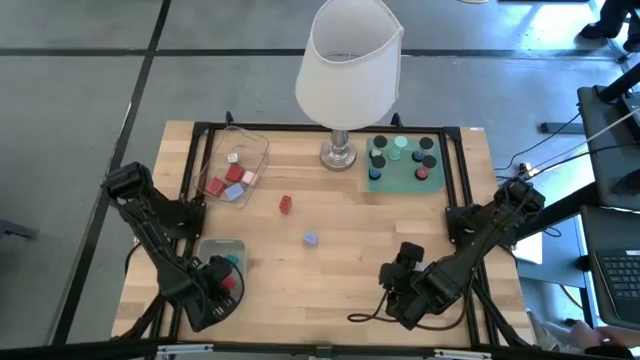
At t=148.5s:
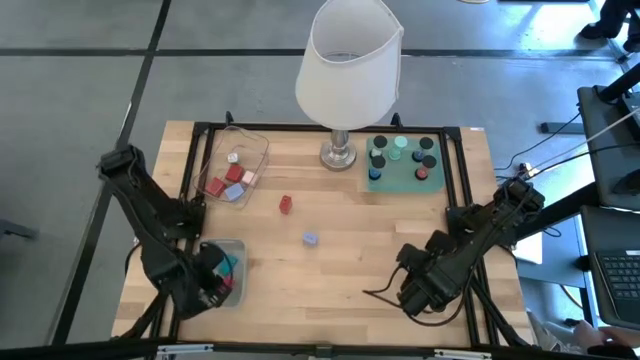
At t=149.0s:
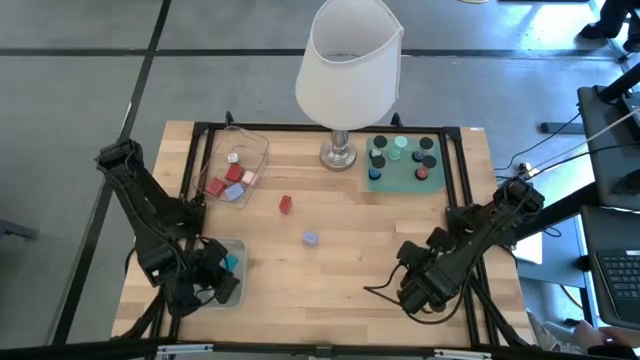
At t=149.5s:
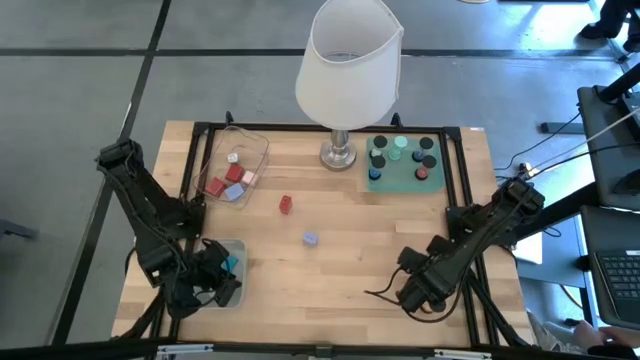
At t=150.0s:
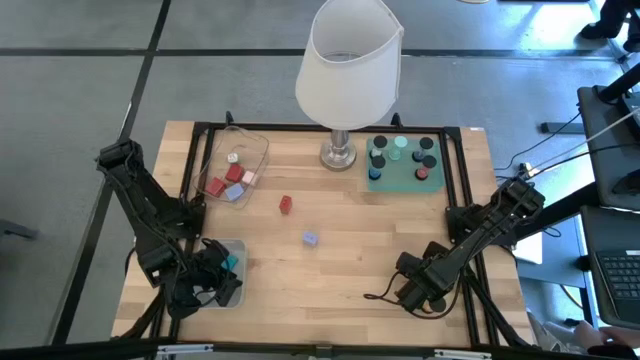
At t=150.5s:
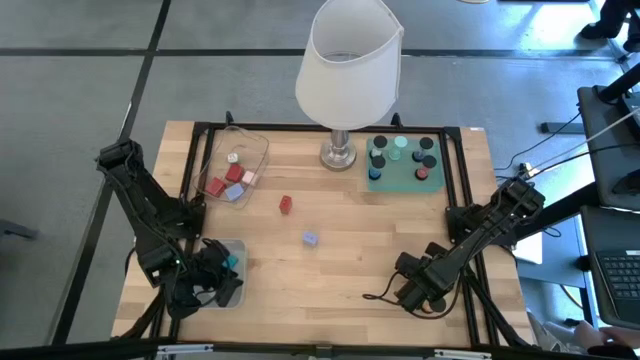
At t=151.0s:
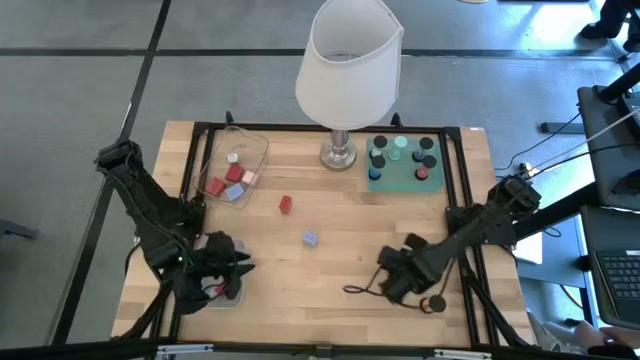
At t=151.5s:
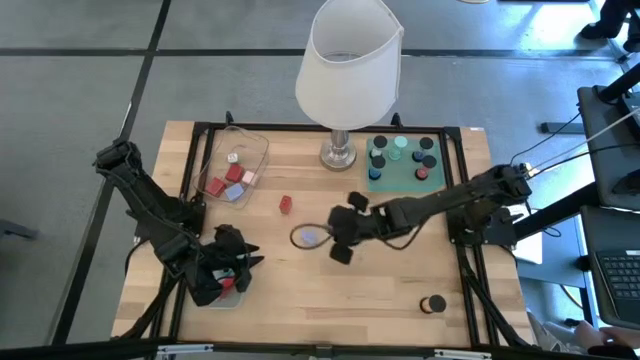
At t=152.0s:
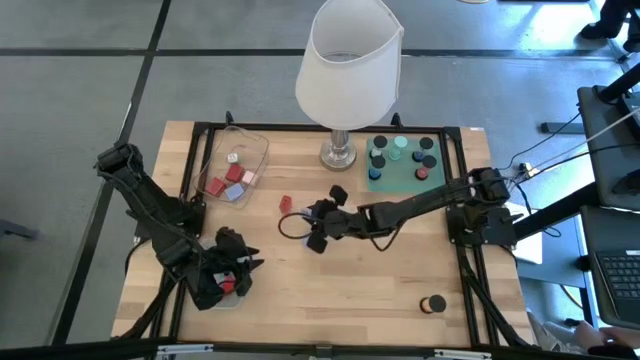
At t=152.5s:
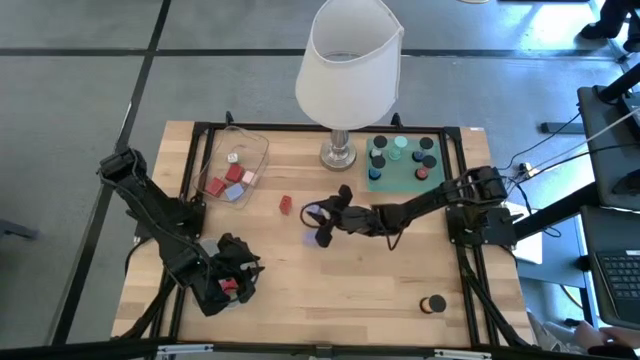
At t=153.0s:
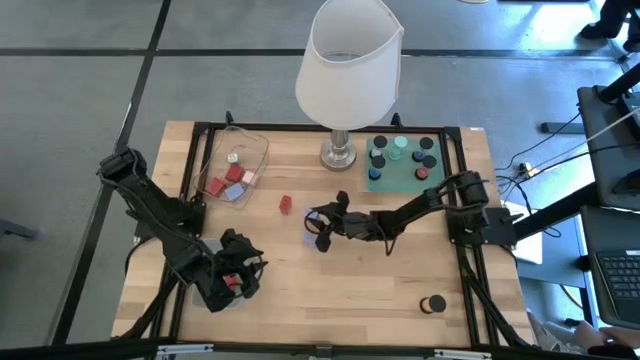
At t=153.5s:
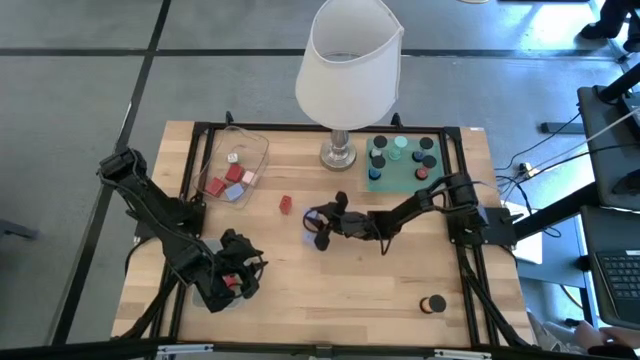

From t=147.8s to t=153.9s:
Task: Pick & Place Office items
Move the light blue charger adapters to the center of the table

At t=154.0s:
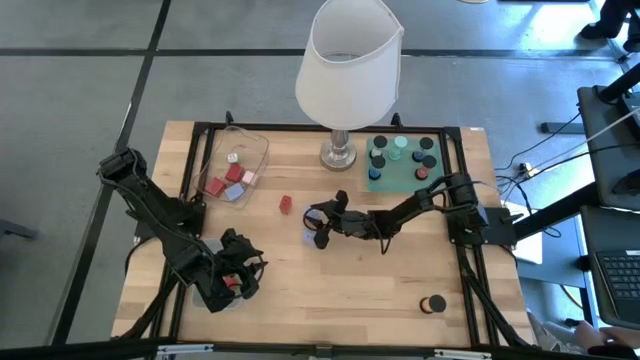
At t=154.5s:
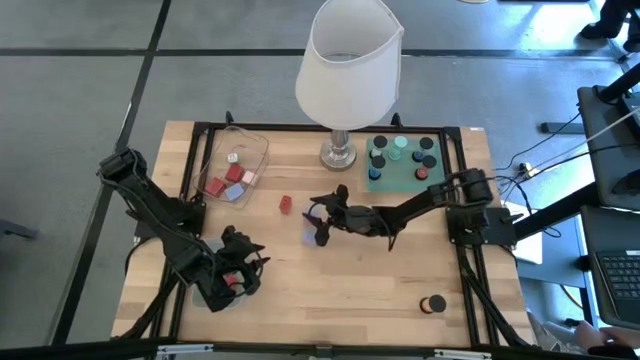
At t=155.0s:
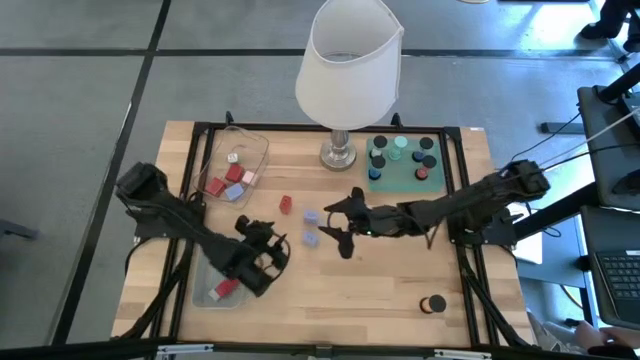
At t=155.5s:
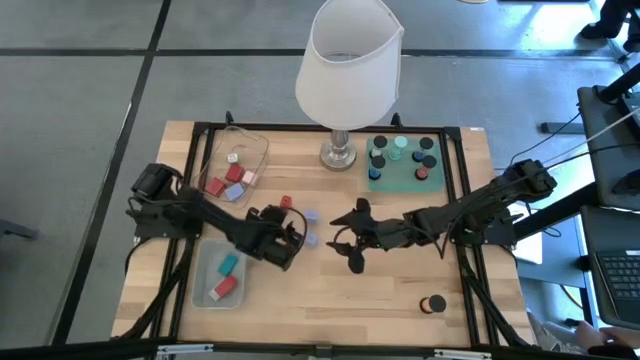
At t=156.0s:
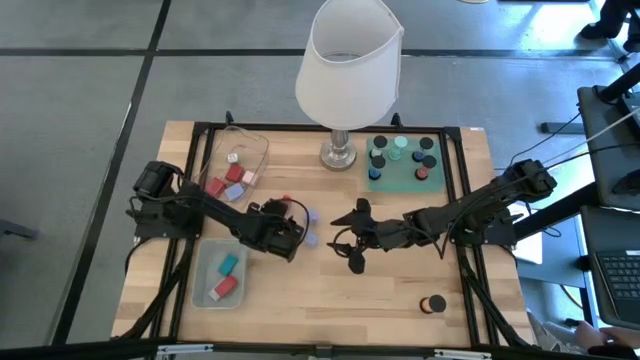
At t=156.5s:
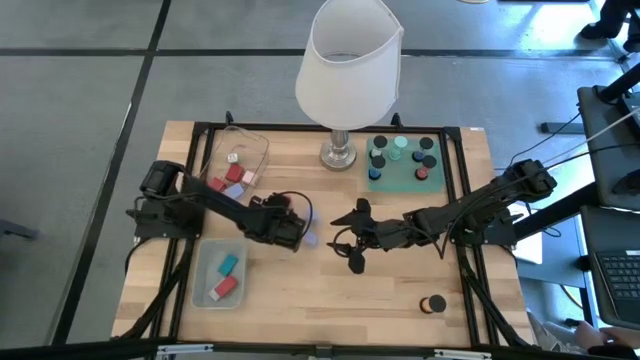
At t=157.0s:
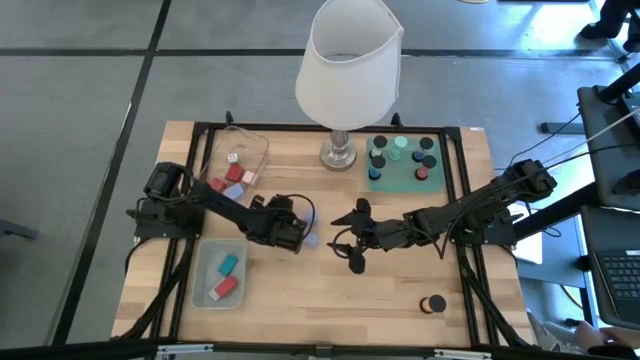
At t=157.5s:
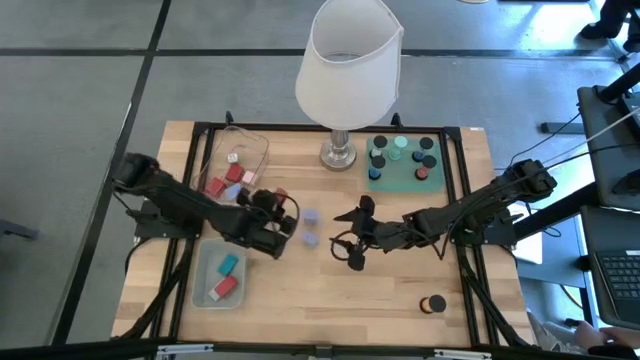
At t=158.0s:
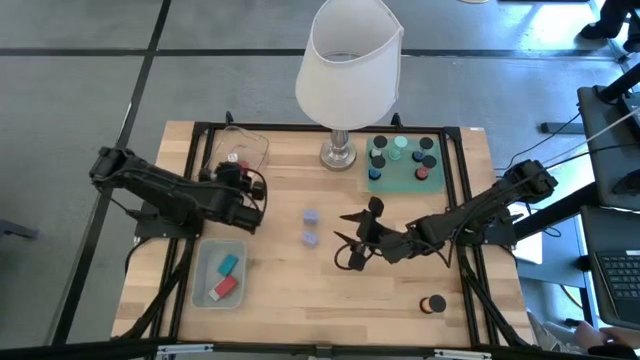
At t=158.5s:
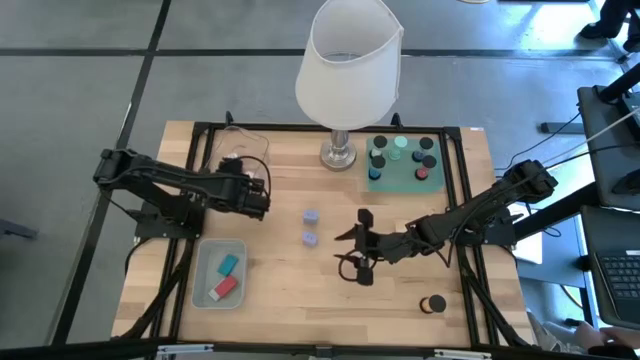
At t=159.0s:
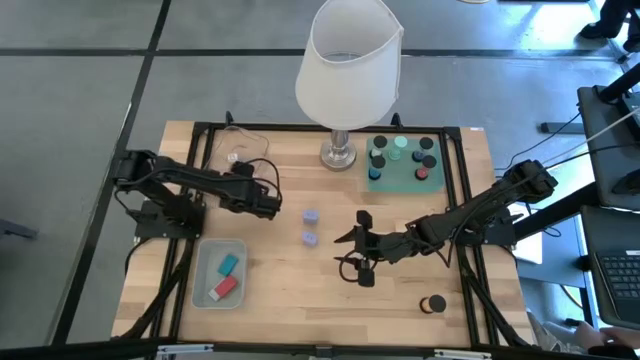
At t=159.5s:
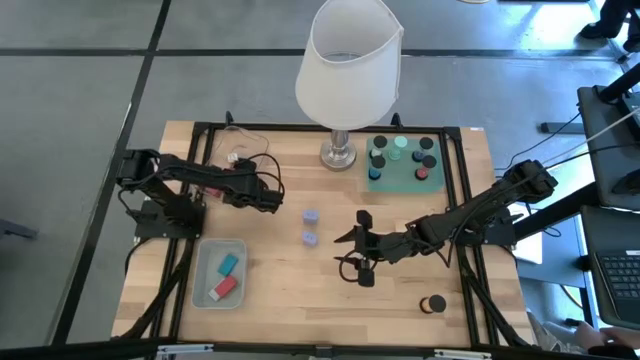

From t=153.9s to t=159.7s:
Put the red charger adapter into the transparent bin

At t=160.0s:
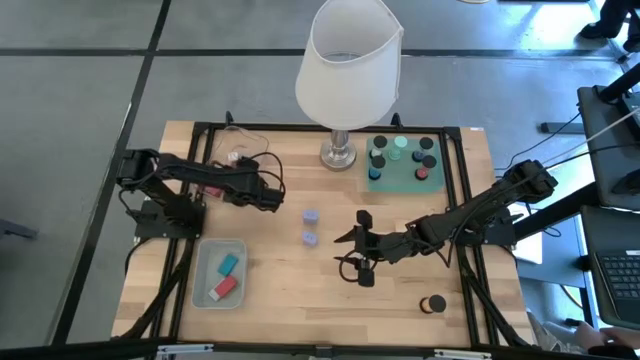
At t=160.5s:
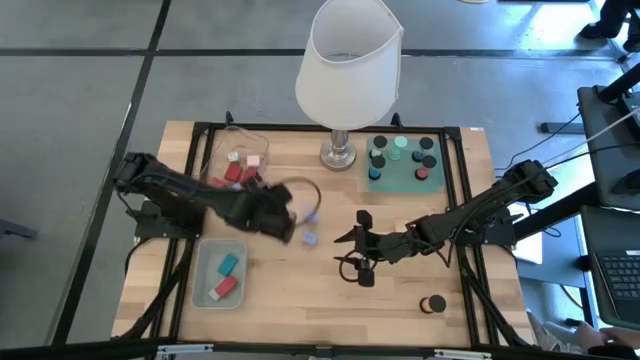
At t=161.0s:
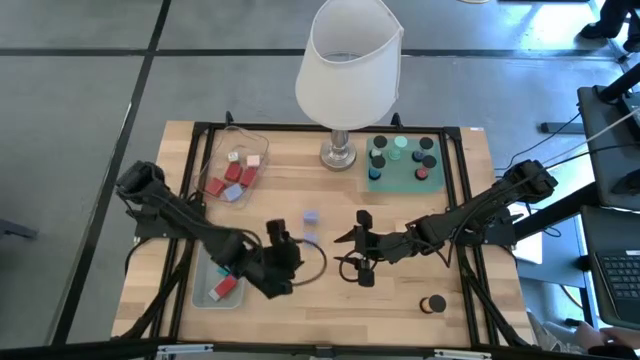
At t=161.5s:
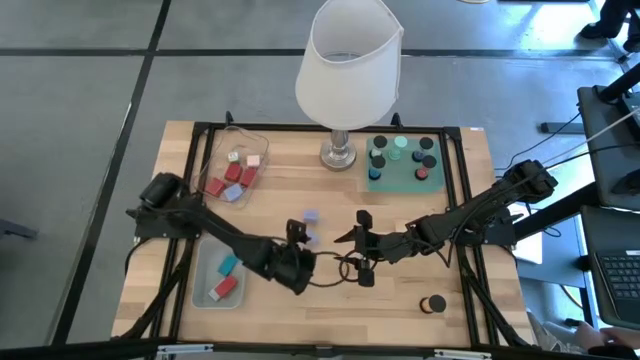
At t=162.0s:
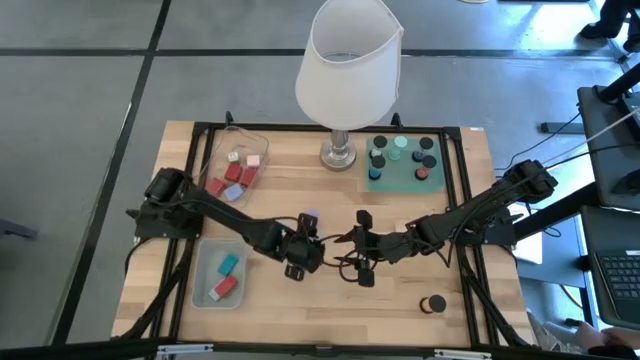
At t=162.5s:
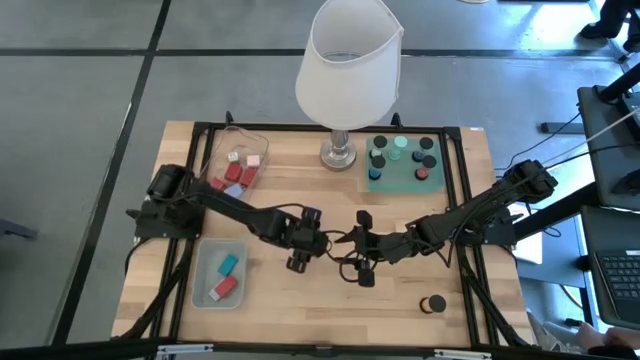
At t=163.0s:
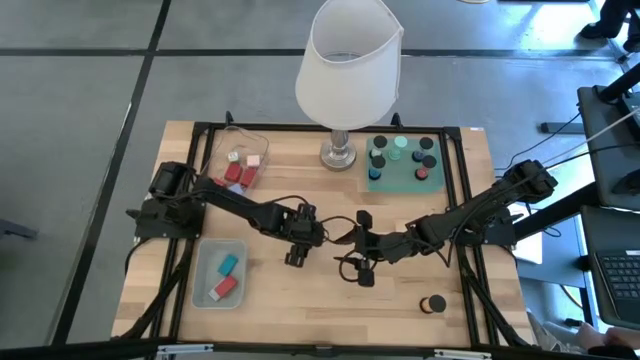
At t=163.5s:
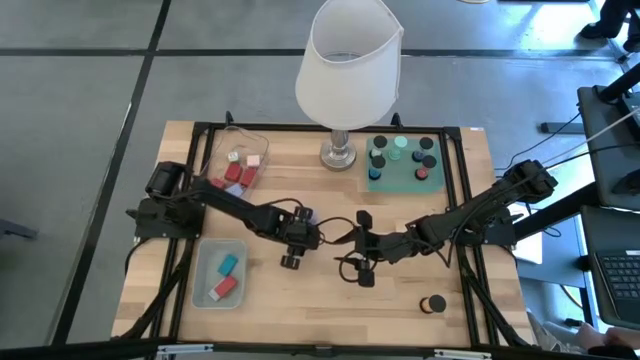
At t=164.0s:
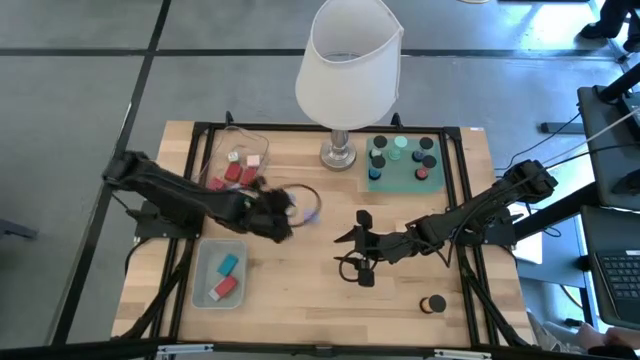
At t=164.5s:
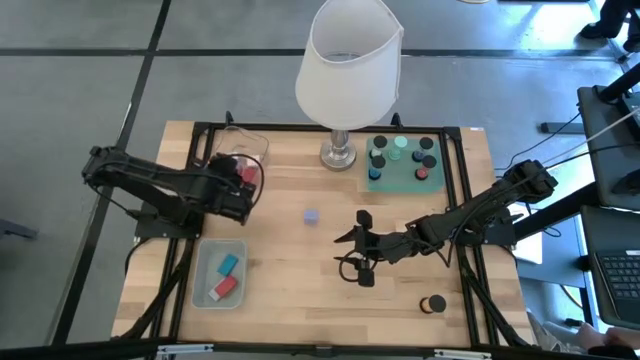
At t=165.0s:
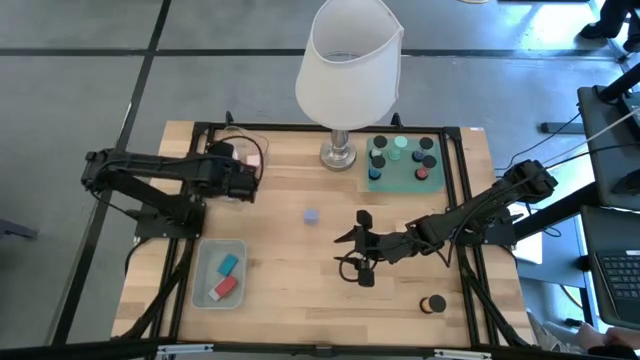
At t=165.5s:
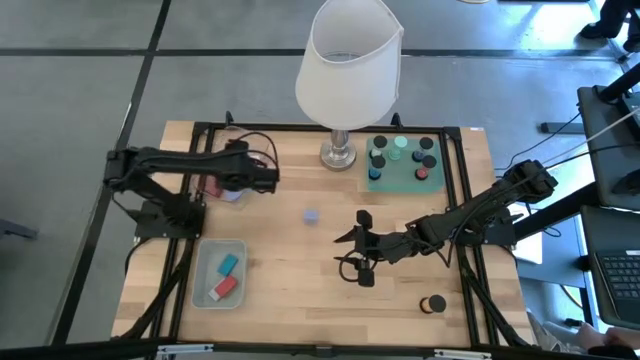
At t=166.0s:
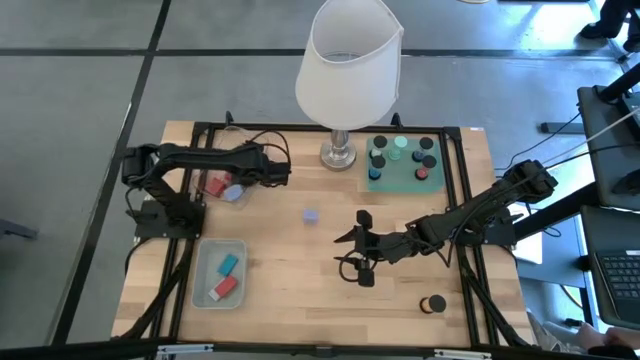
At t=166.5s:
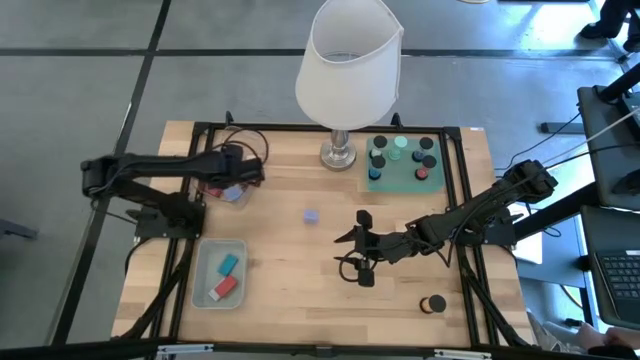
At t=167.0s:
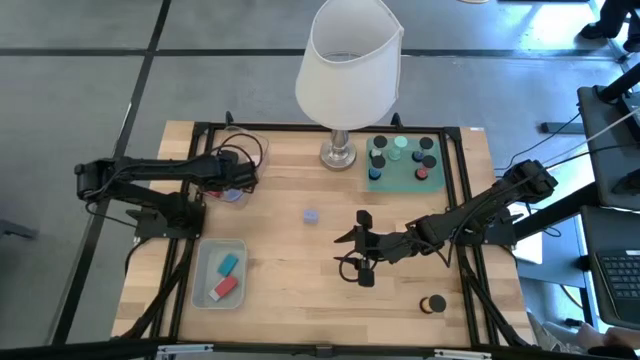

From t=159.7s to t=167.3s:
Put the light blue charger adapter into the transparent bin

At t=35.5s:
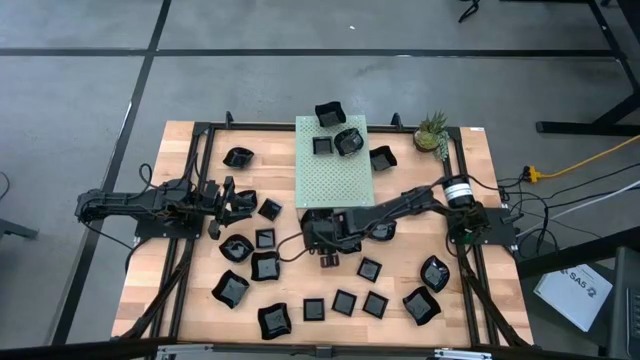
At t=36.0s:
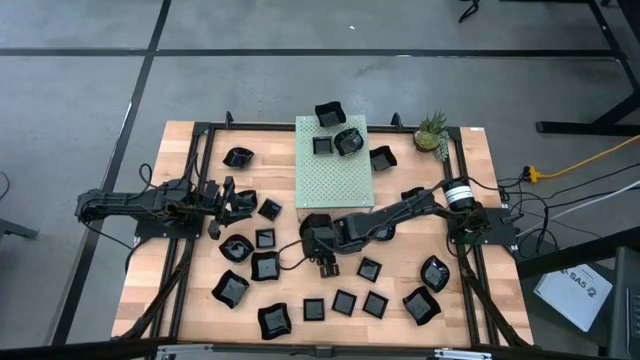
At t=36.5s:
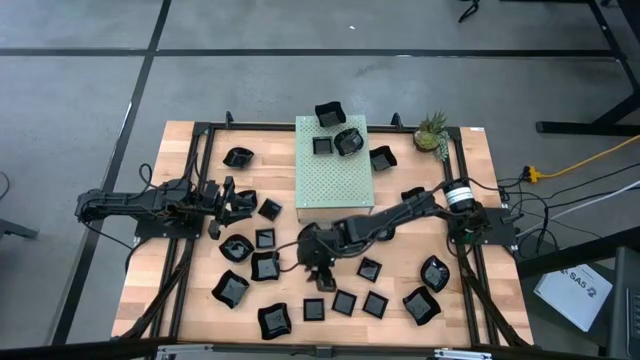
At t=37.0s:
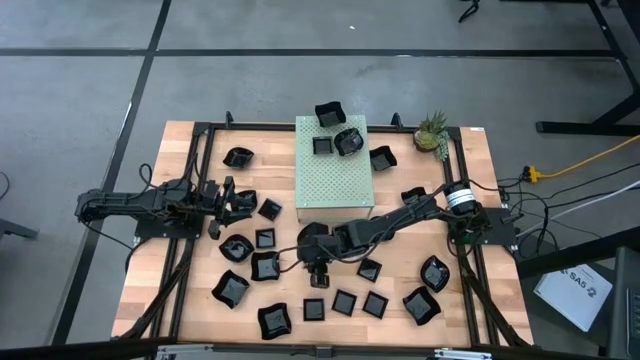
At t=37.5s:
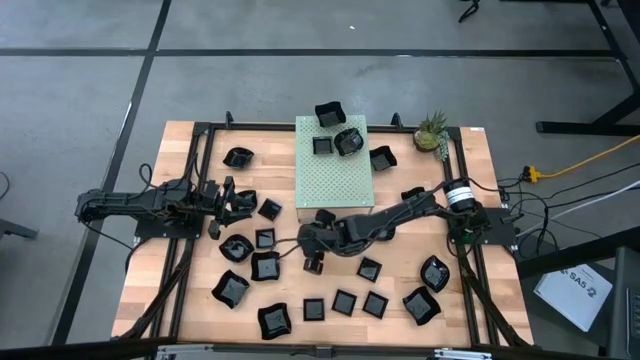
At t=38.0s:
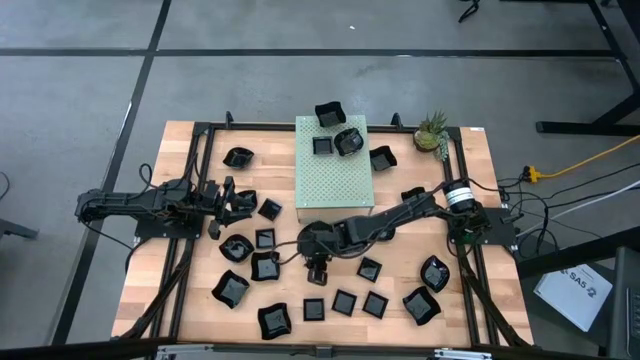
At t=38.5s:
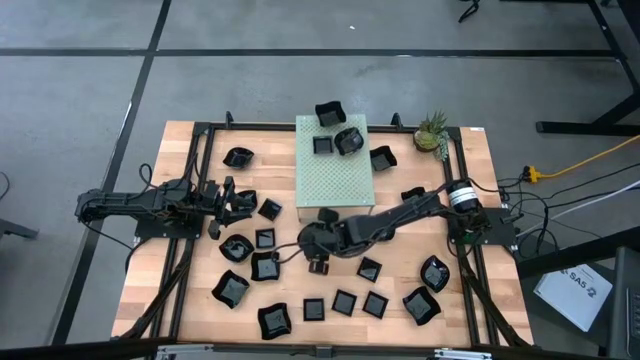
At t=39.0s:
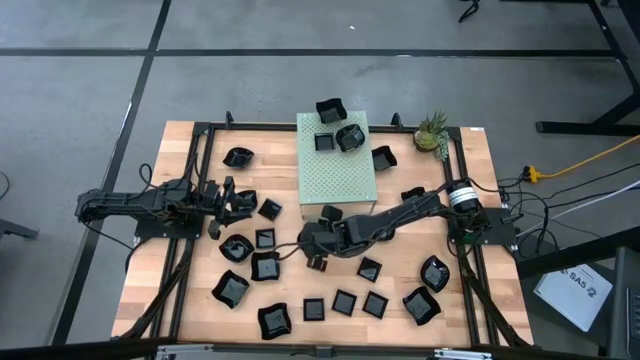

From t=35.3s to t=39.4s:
Task: Pick & Place Mini shaped plates
Adjust the black leaf shaped plate
